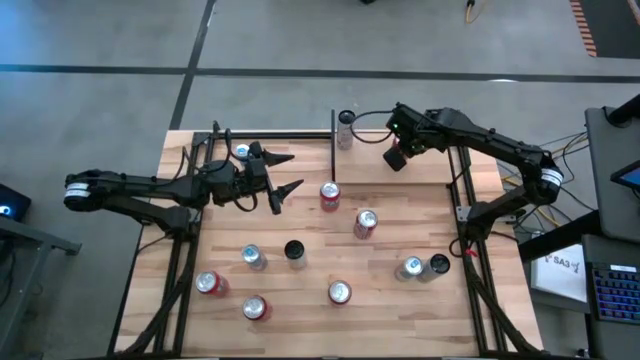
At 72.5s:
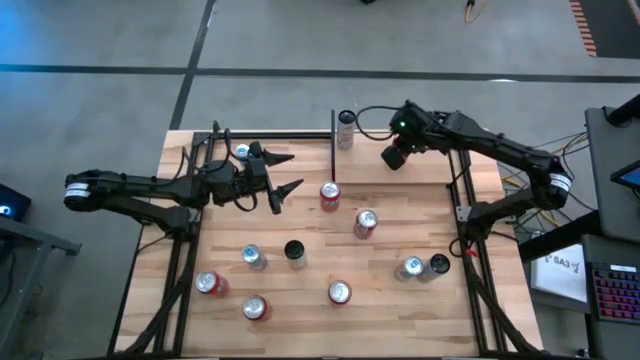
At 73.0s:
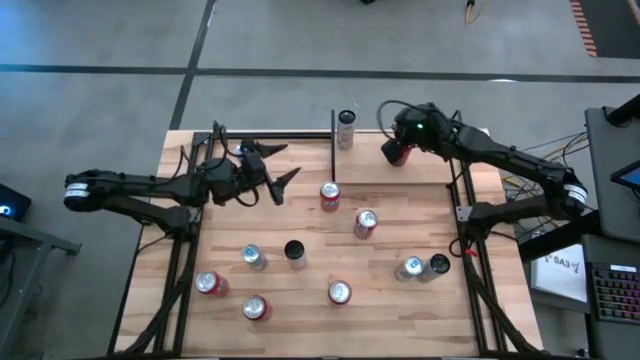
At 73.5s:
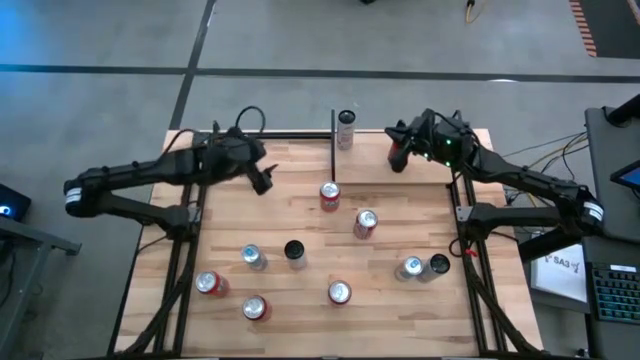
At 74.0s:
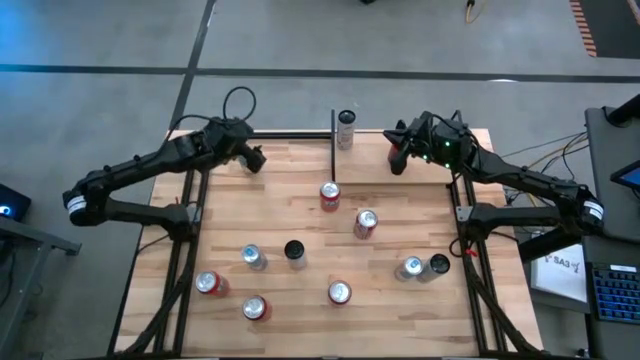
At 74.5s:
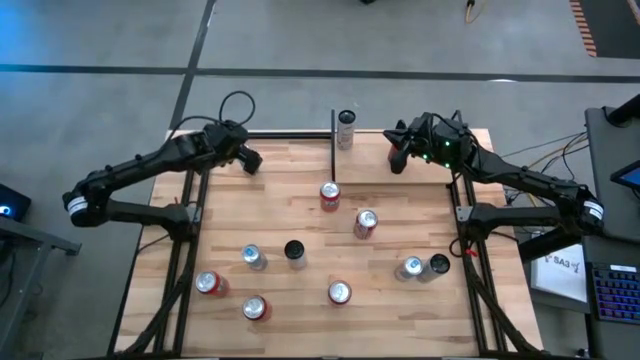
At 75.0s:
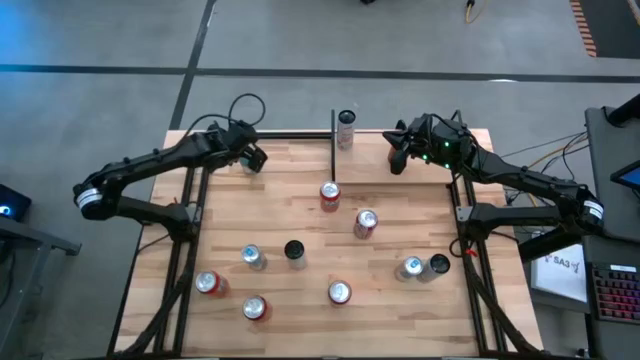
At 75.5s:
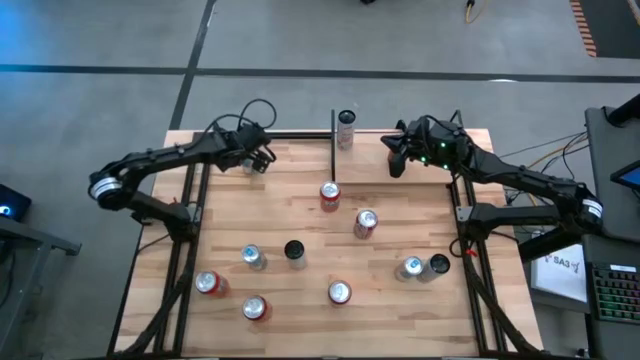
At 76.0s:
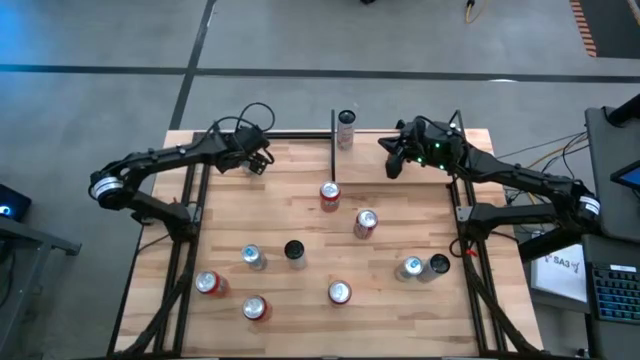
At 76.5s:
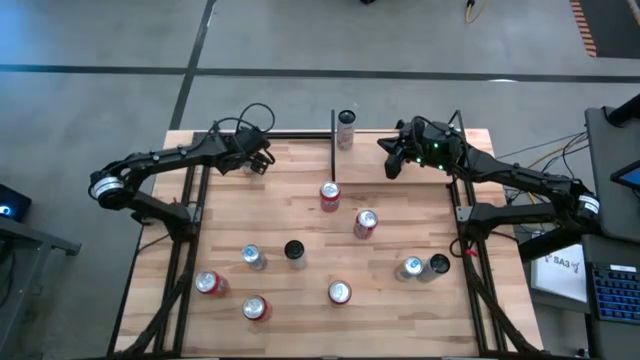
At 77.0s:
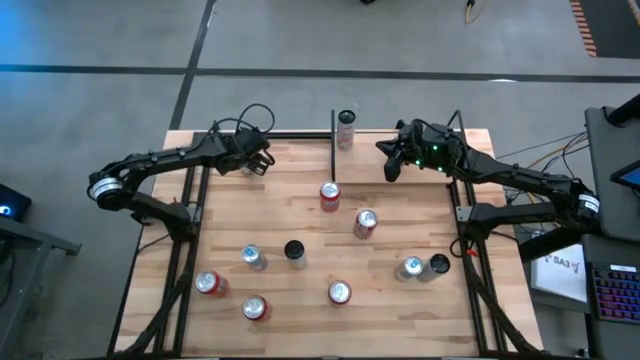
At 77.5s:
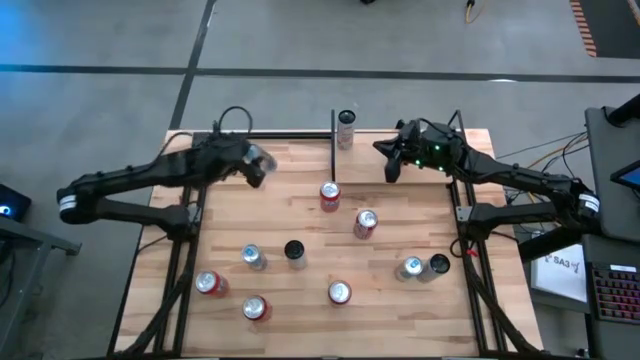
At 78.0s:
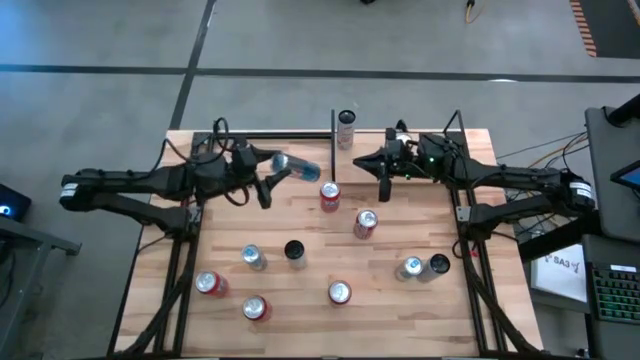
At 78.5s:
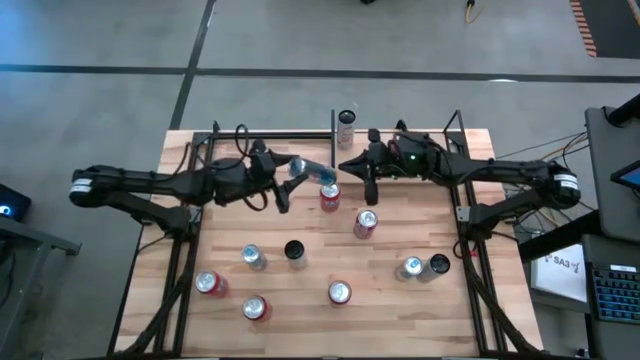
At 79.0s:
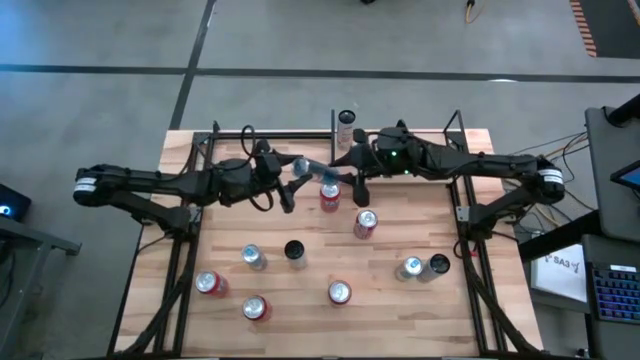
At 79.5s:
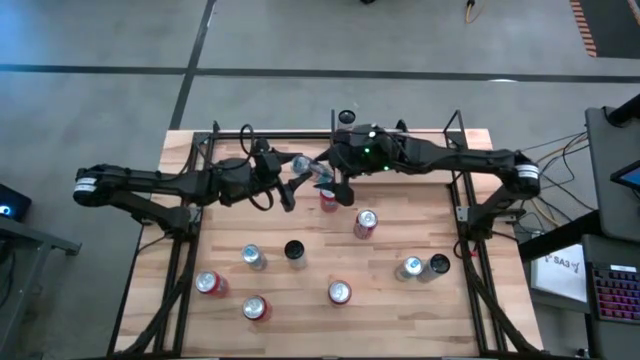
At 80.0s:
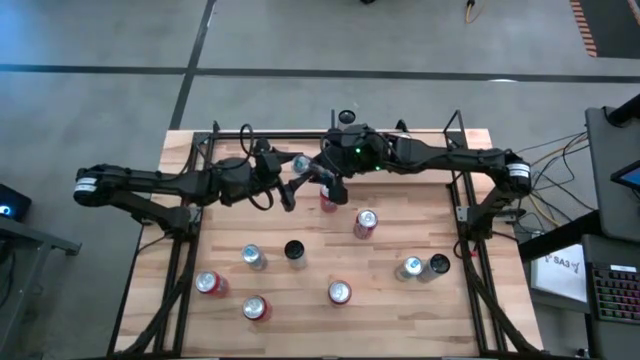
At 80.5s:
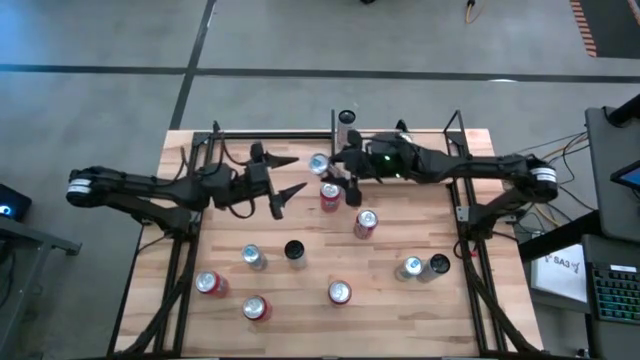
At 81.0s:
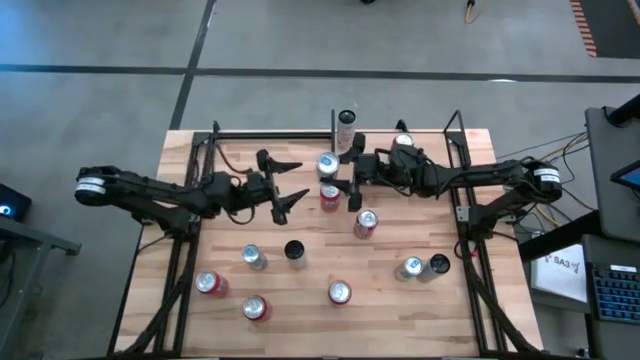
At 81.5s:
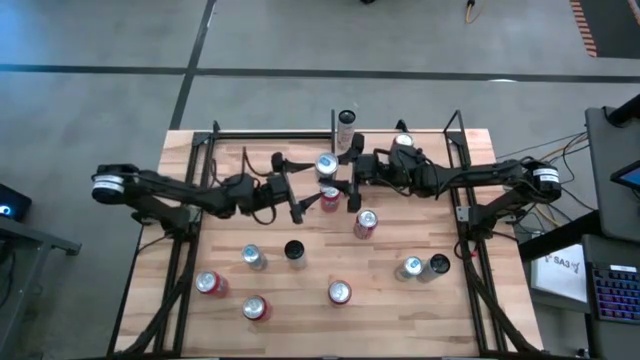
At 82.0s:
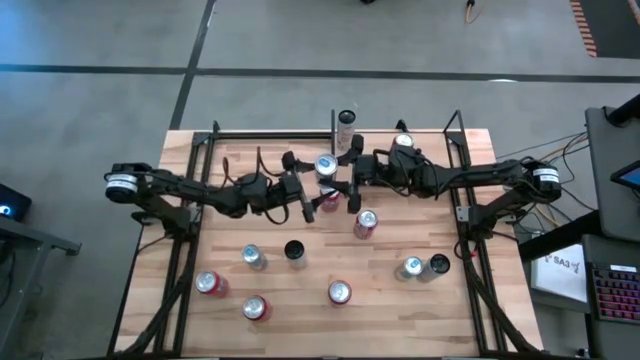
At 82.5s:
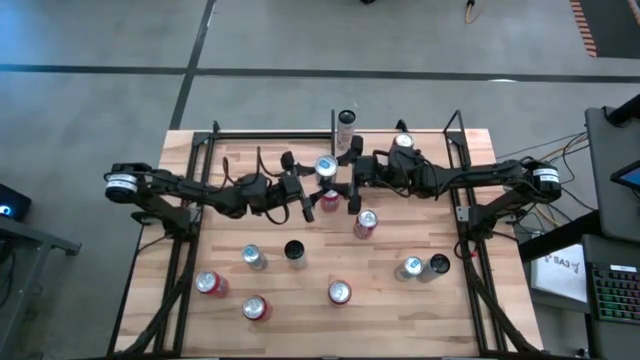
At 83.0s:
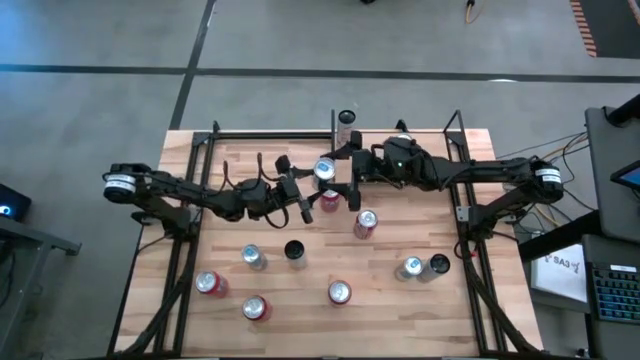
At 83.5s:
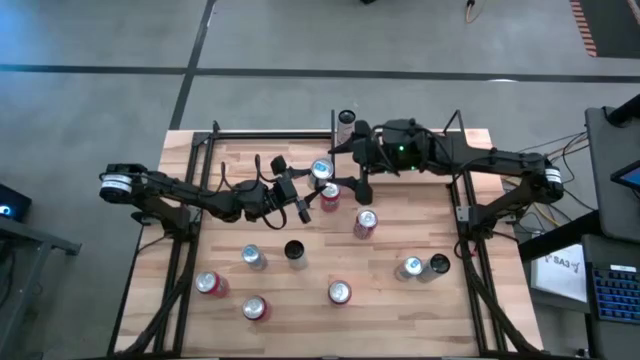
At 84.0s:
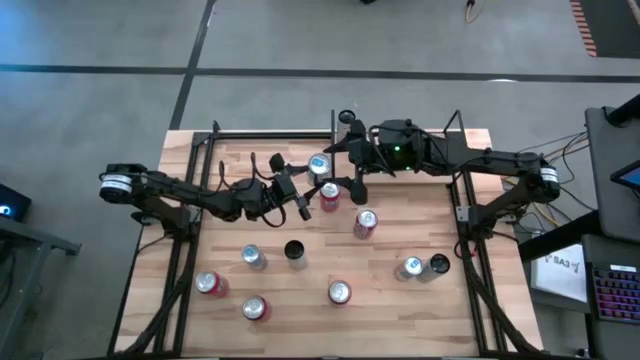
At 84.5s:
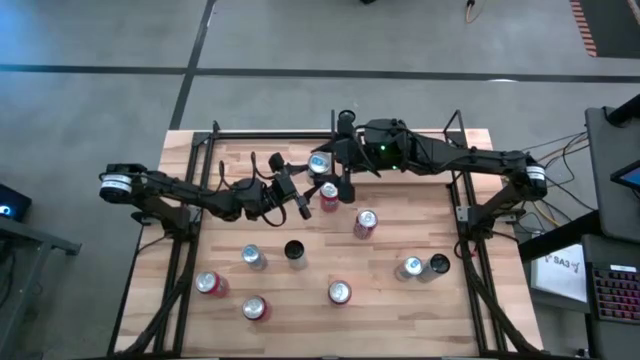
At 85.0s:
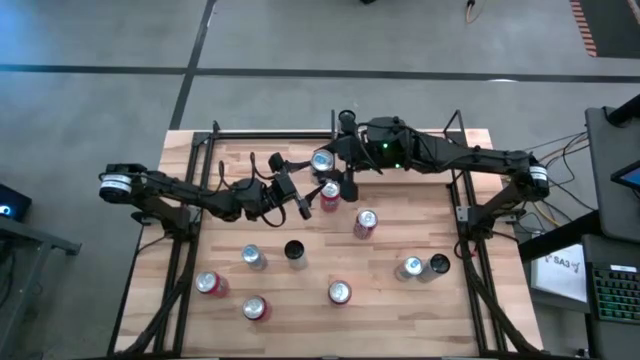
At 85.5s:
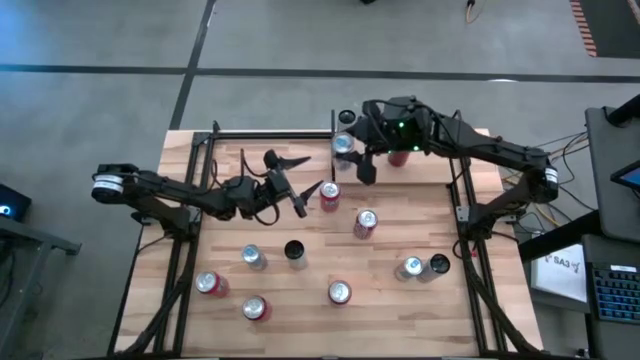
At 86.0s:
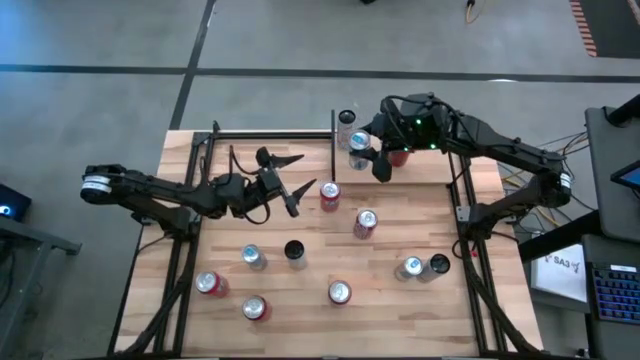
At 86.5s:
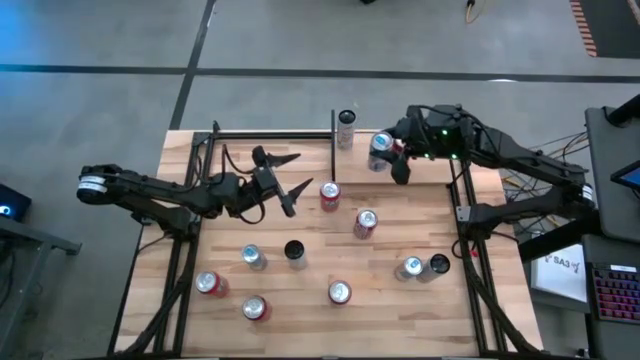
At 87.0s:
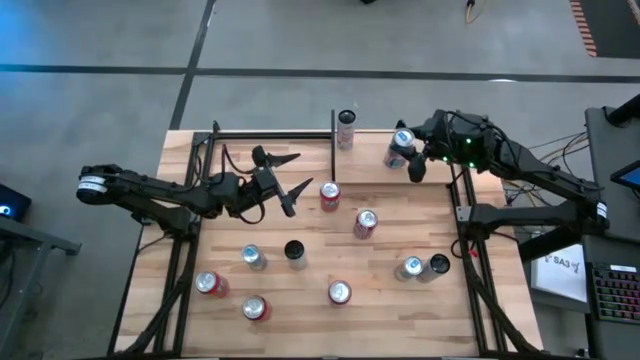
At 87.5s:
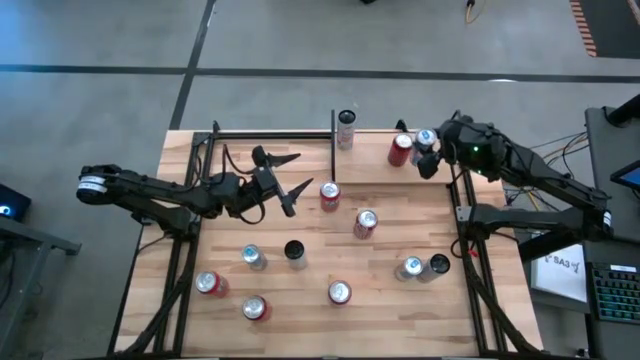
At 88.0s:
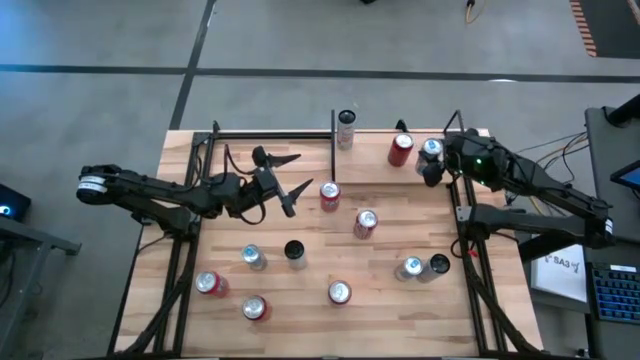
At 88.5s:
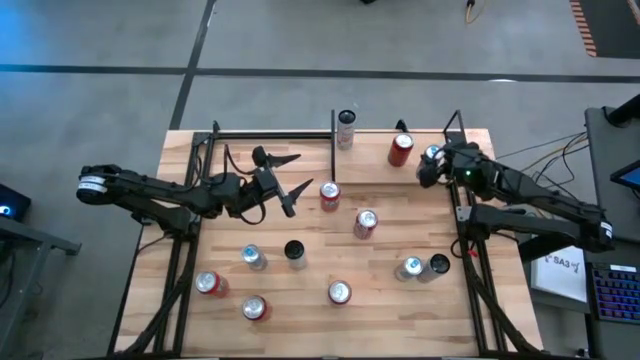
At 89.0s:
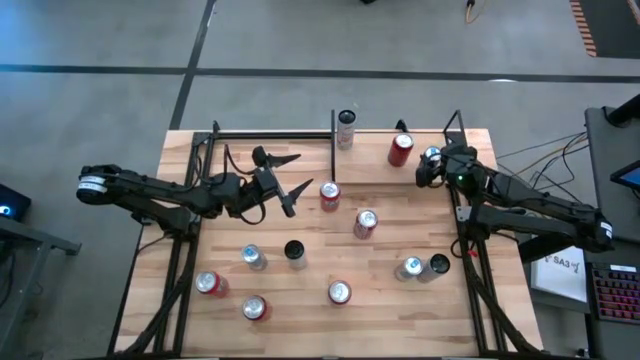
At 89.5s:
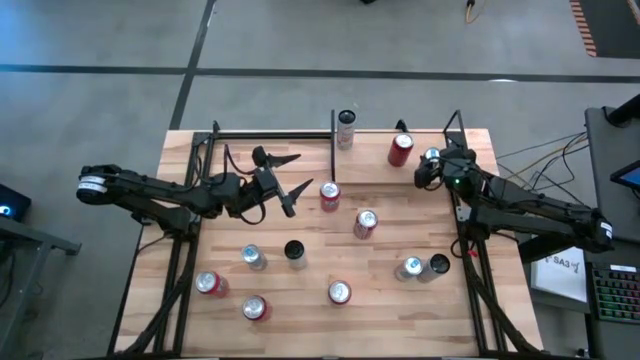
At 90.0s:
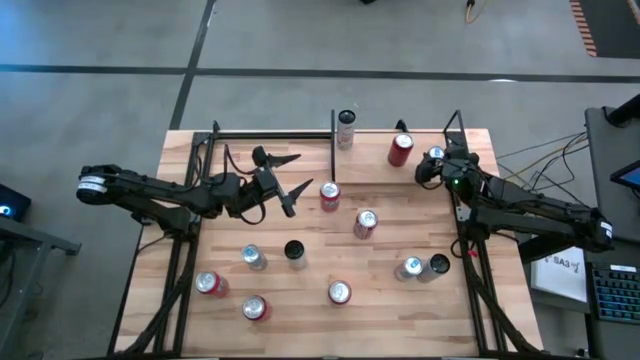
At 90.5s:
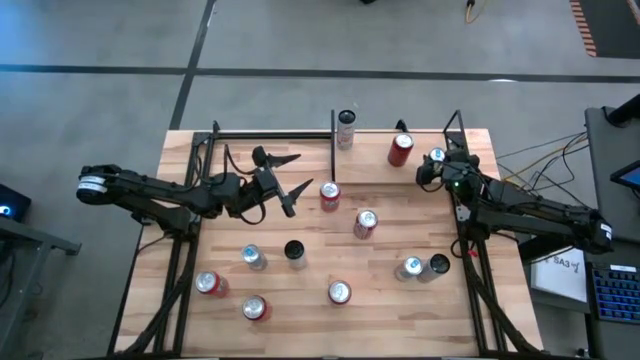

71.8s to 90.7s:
Task: Place canned beverage on shelf
Put the top blue soda can on the shelf

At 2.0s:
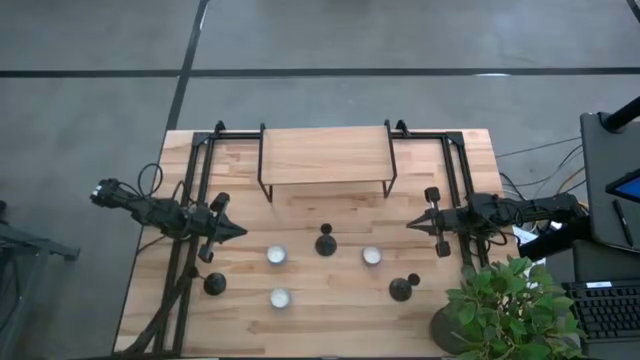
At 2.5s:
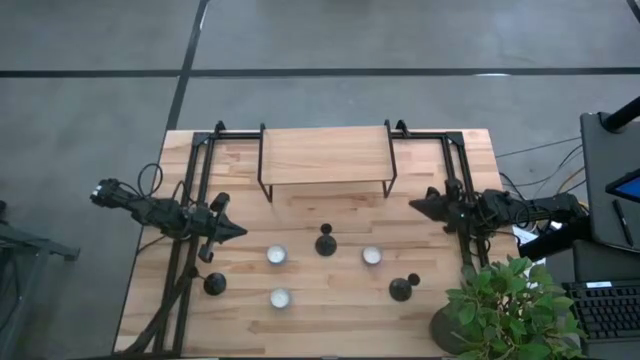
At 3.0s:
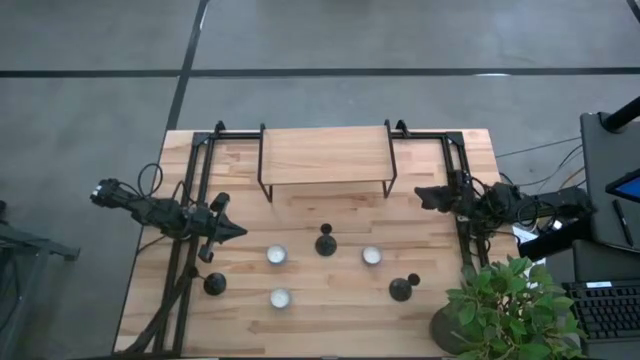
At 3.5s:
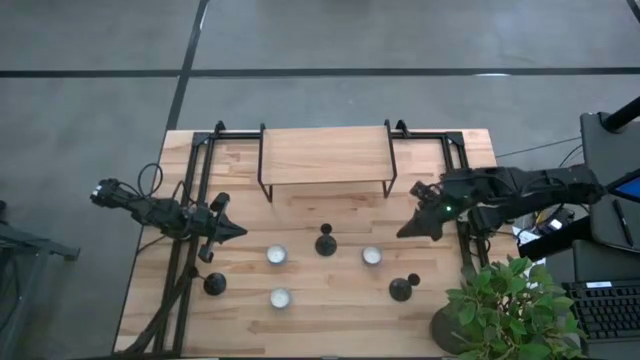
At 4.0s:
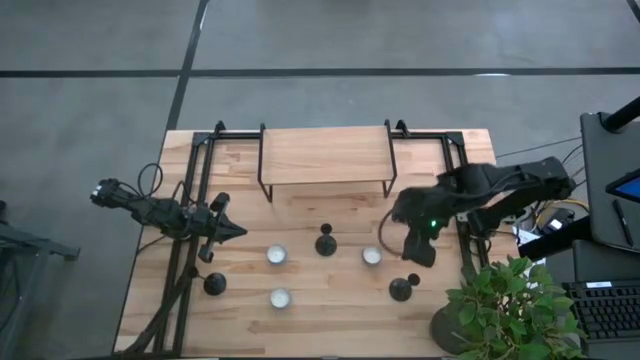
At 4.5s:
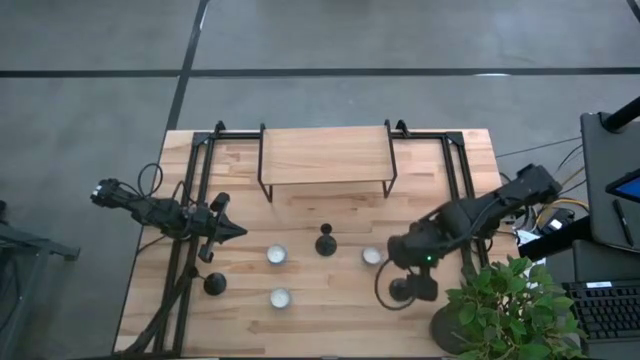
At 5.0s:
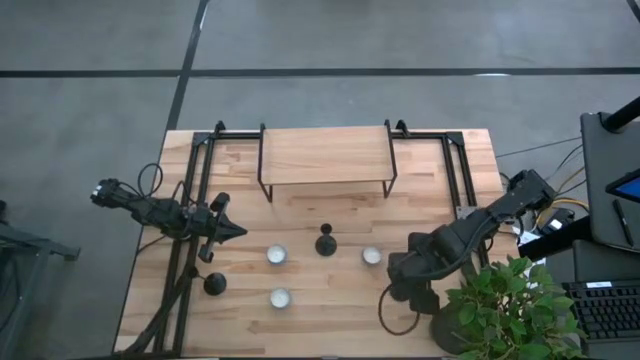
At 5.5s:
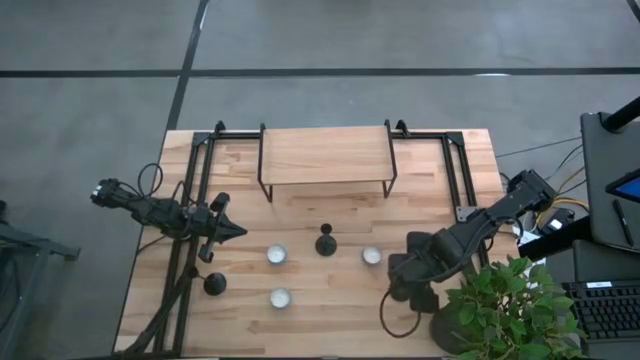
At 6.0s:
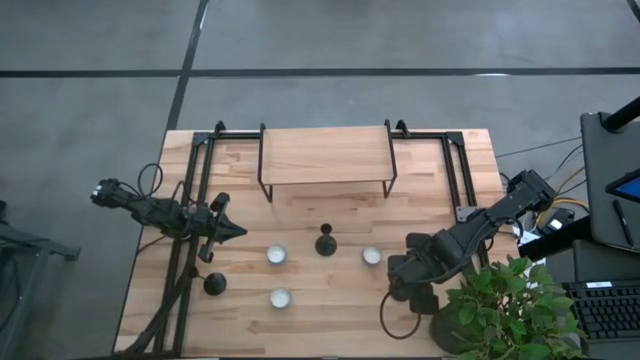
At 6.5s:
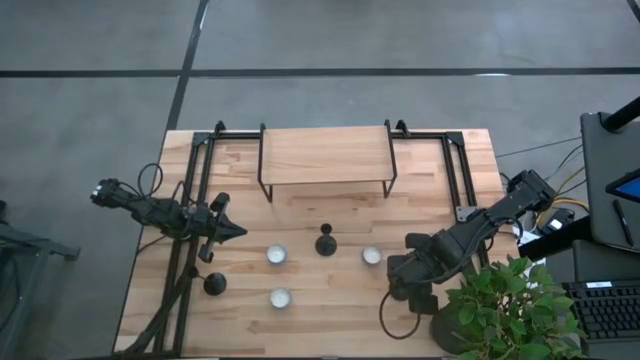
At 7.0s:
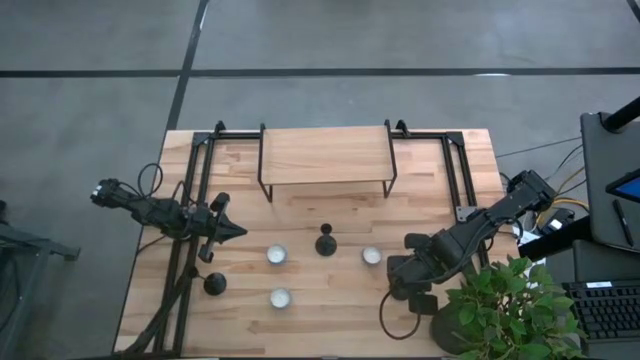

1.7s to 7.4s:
Task: Pick & Place candle stick holders
Put the bottom right black candle holder on the shelf
